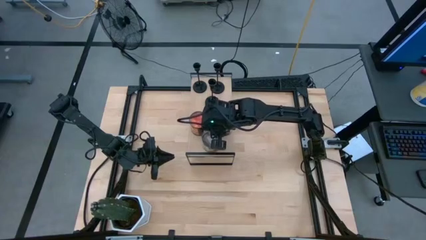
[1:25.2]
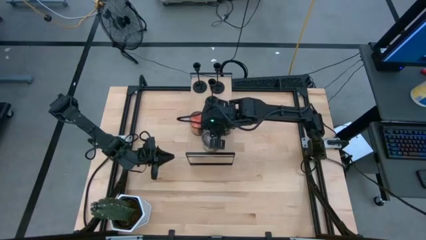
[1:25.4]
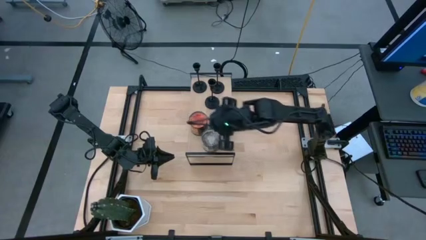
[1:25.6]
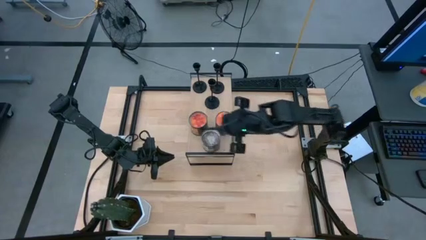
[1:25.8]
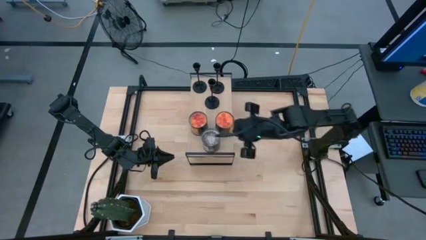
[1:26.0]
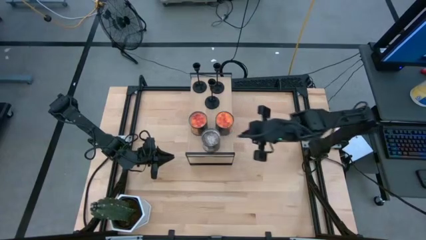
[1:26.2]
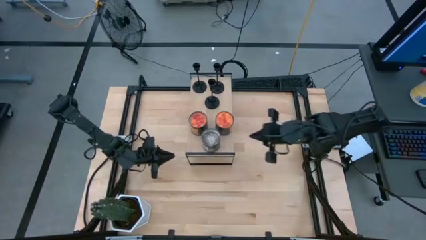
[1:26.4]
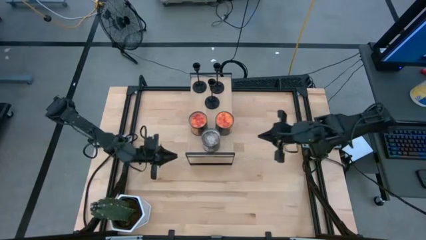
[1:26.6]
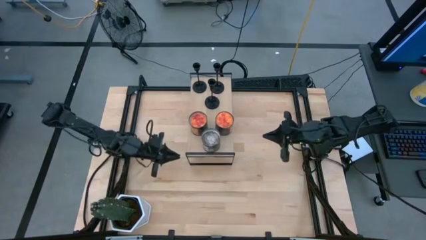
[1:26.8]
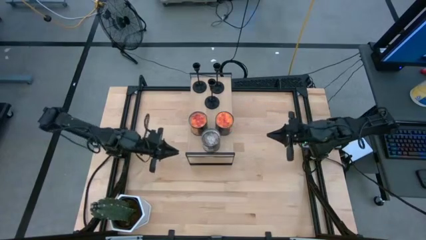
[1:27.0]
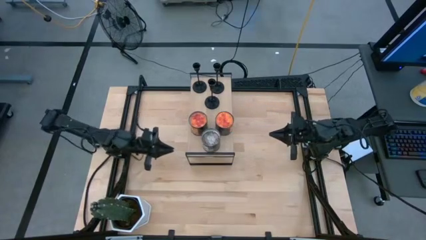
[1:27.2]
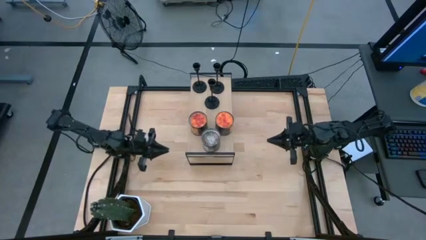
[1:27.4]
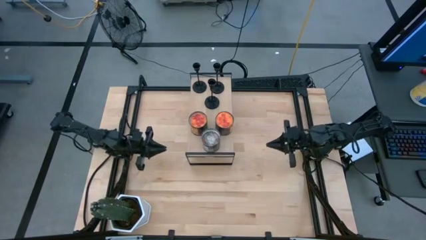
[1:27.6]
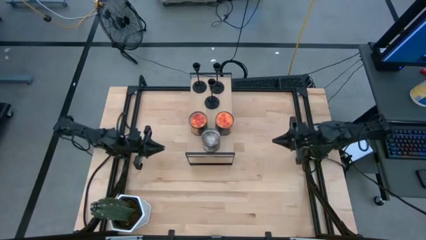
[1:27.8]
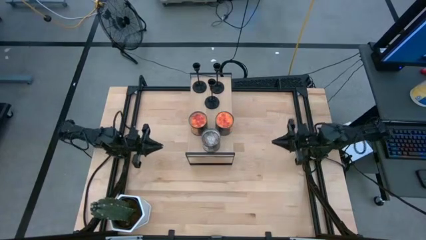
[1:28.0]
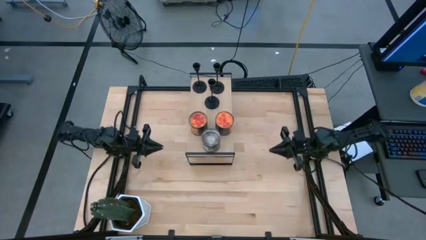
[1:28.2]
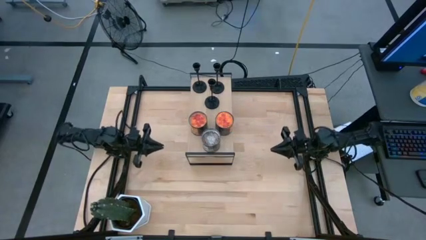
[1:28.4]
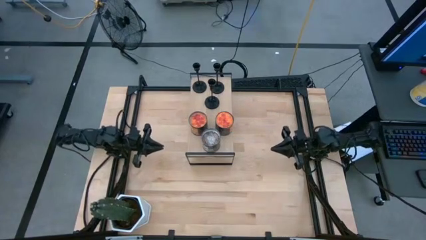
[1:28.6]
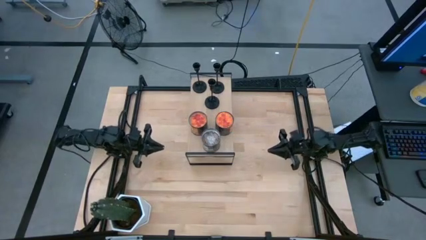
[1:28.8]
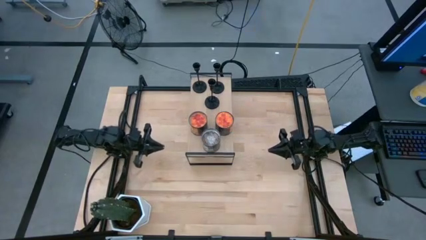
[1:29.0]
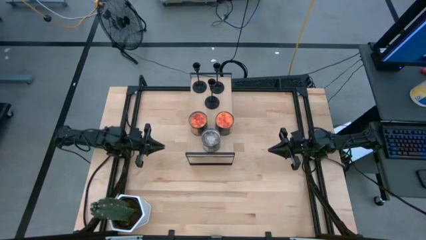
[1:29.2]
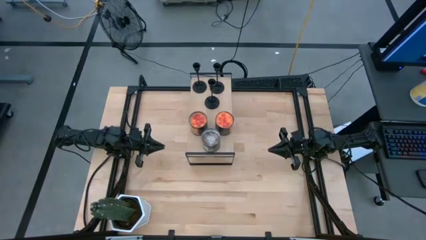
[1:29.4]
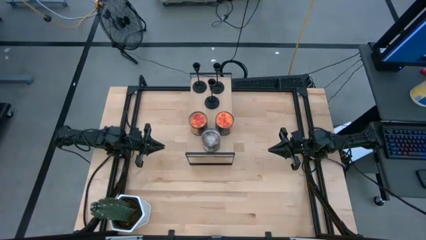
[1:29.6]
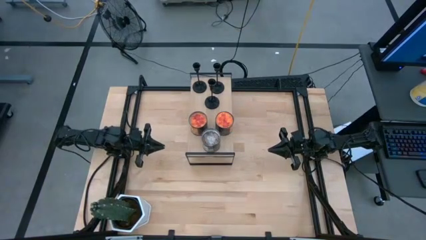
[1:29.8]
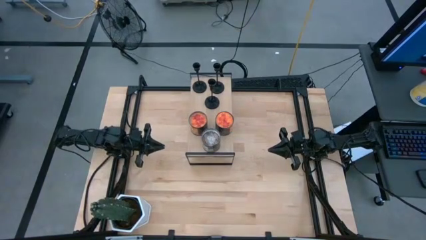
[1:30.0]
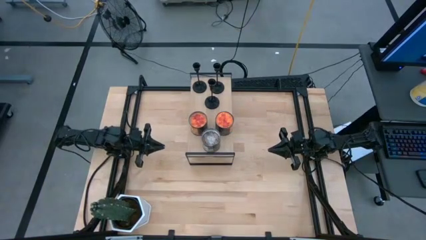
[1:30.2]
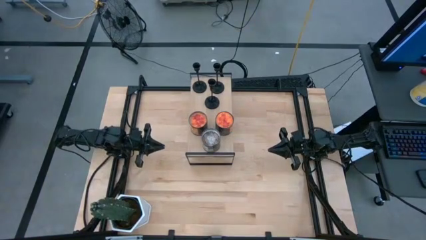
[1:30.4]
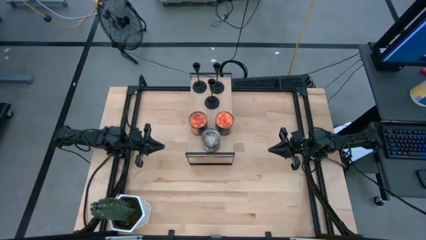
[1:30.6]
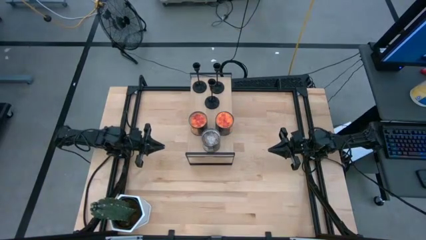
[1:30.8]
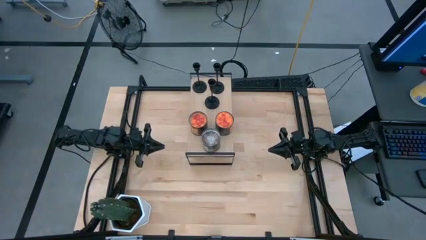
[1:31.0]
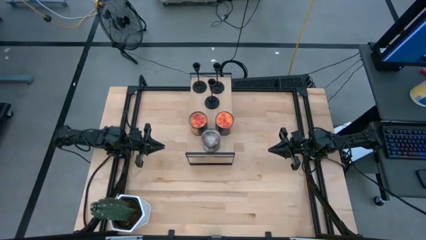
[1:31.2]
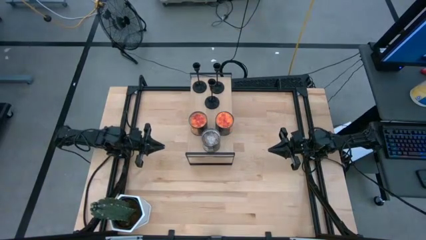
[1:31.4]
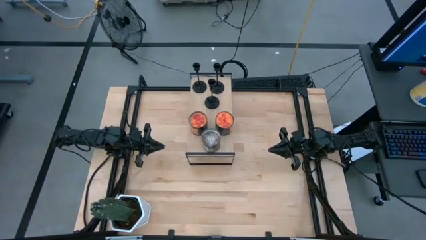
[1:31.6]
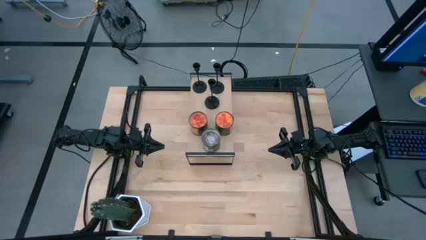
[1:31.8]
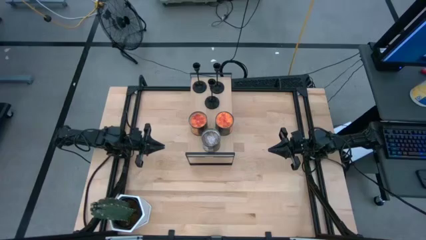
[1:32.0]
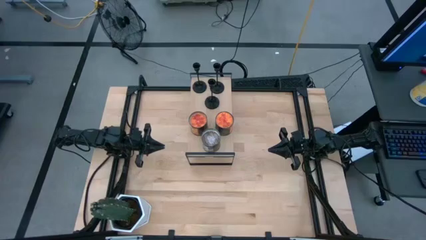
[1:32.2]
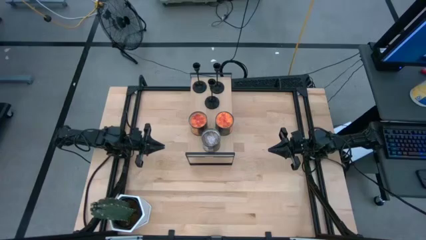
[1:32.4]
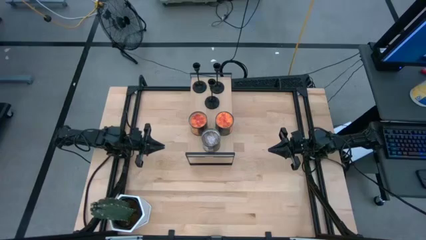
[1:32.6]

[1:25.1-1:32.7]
Task: Pick & Place candle stick holders
Return to Home Position

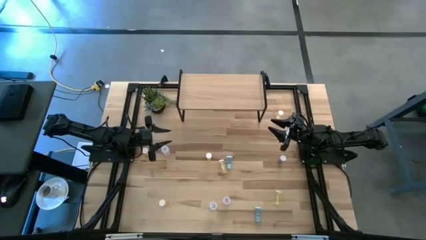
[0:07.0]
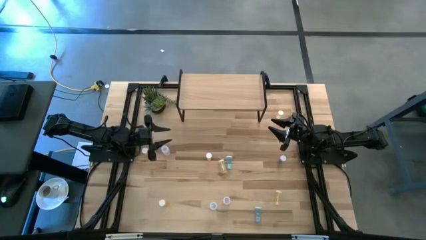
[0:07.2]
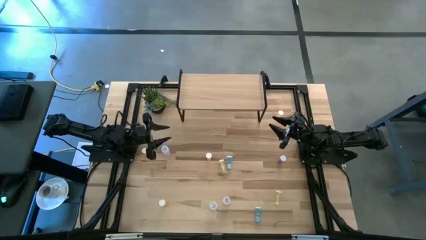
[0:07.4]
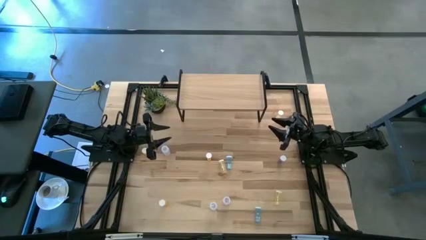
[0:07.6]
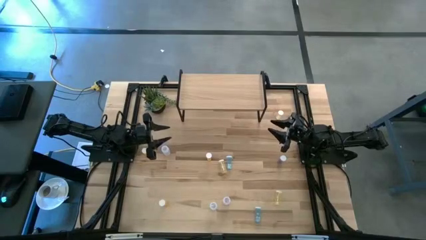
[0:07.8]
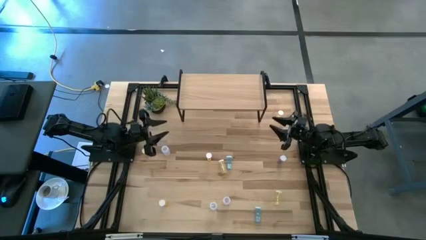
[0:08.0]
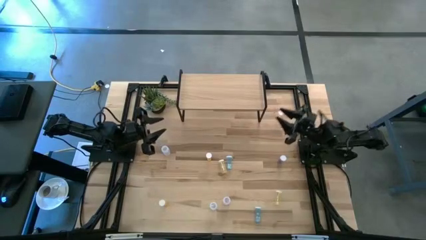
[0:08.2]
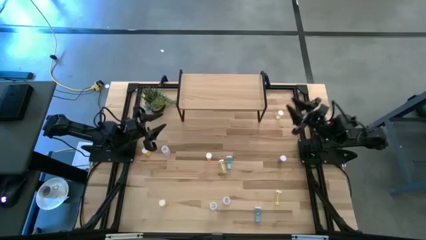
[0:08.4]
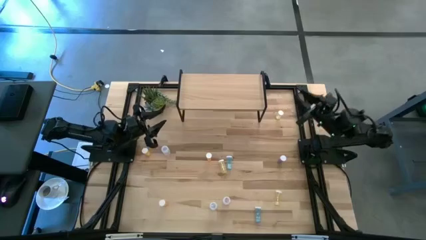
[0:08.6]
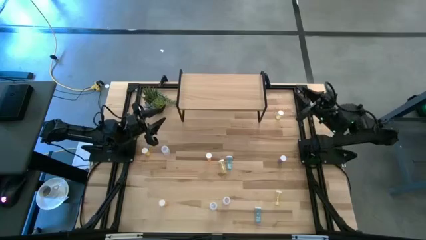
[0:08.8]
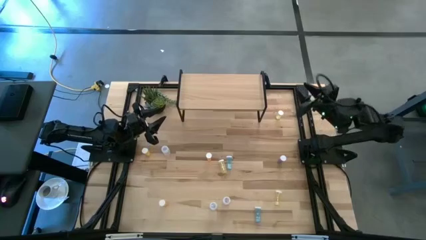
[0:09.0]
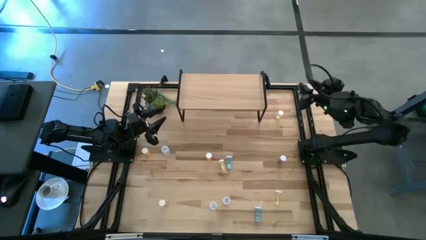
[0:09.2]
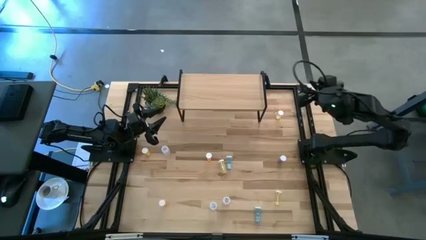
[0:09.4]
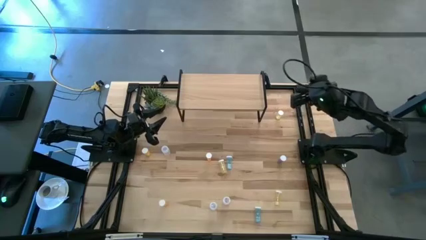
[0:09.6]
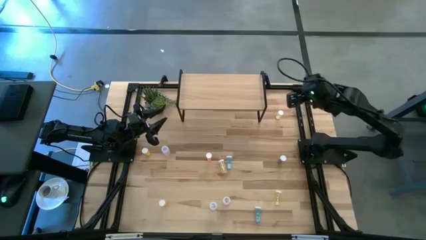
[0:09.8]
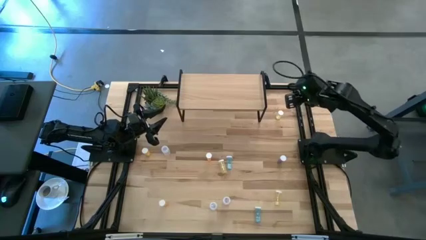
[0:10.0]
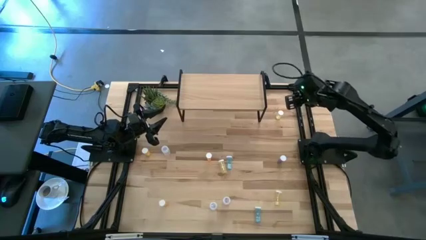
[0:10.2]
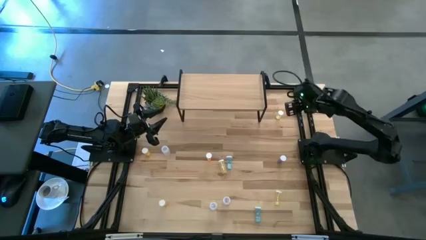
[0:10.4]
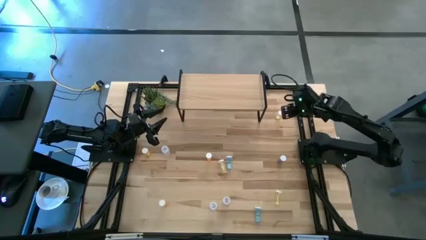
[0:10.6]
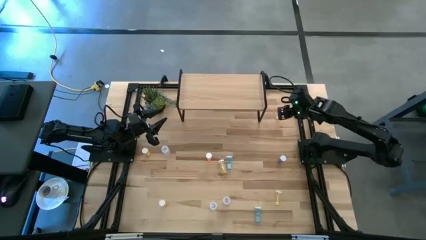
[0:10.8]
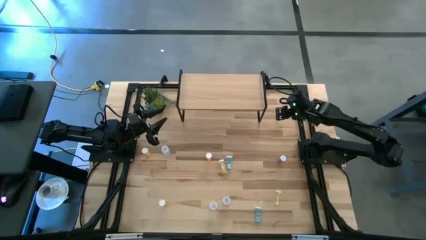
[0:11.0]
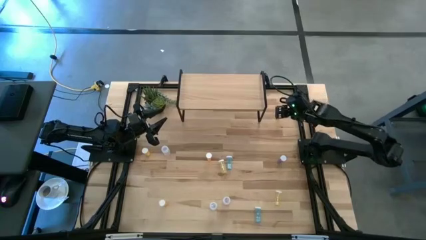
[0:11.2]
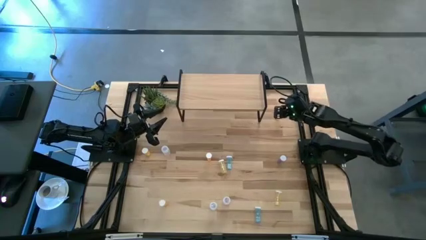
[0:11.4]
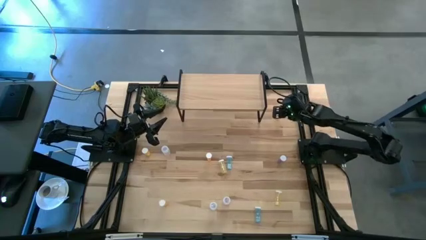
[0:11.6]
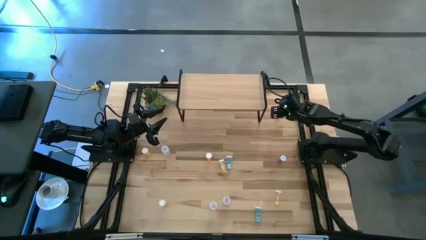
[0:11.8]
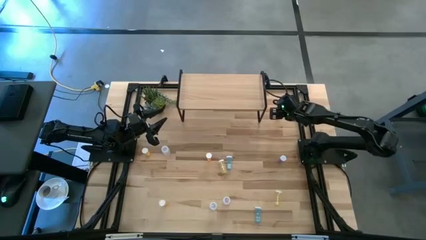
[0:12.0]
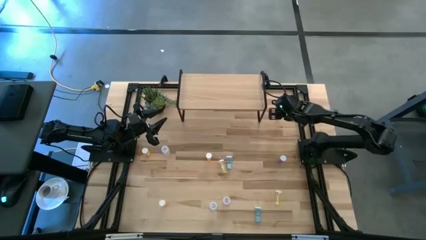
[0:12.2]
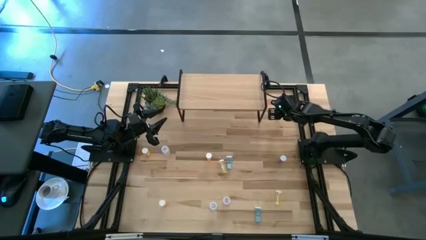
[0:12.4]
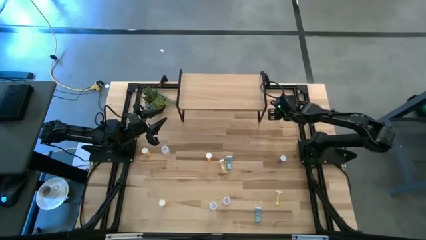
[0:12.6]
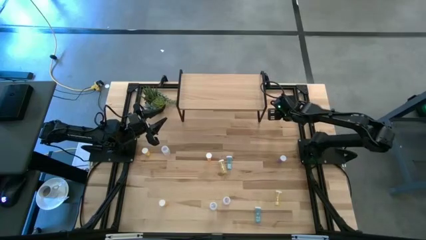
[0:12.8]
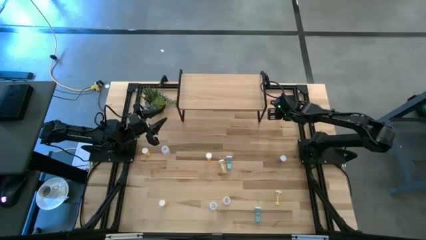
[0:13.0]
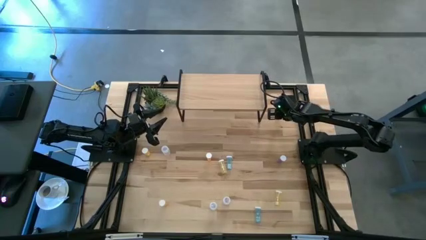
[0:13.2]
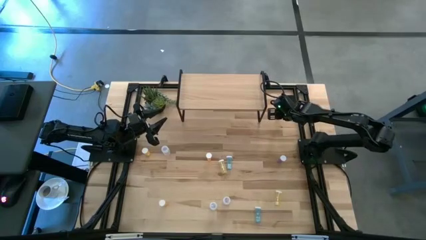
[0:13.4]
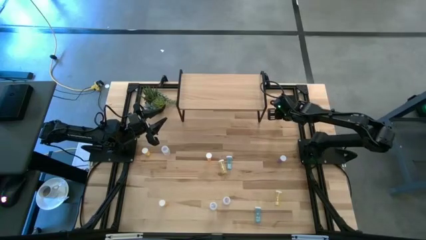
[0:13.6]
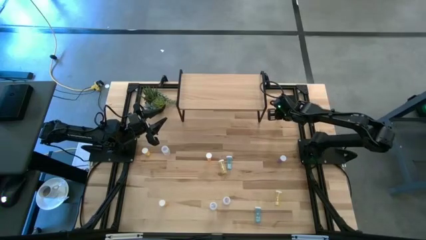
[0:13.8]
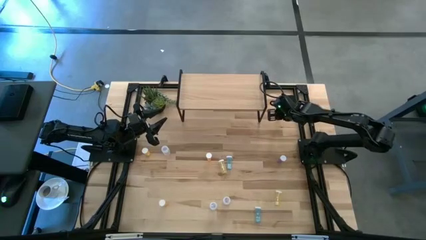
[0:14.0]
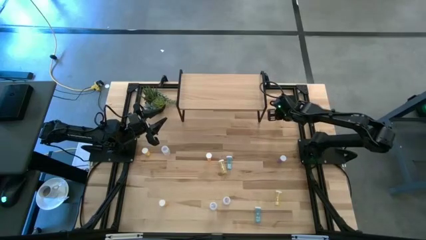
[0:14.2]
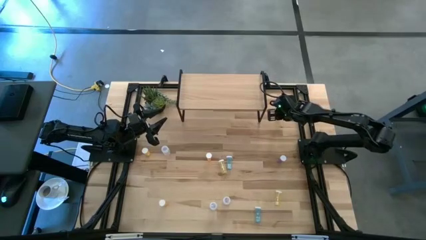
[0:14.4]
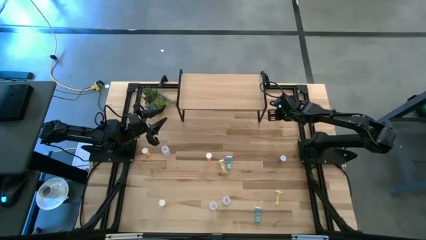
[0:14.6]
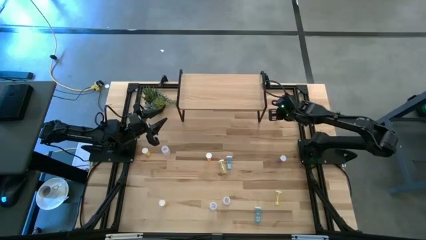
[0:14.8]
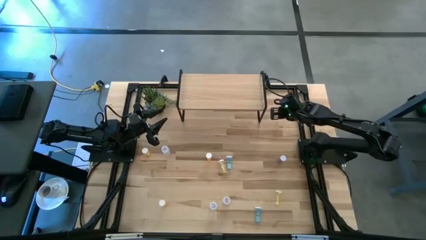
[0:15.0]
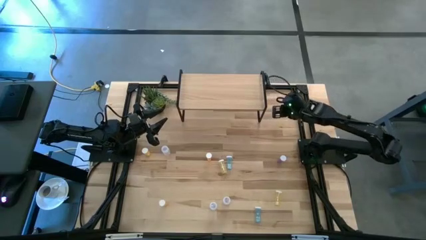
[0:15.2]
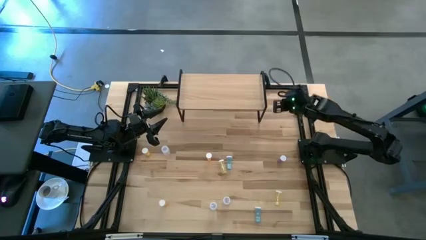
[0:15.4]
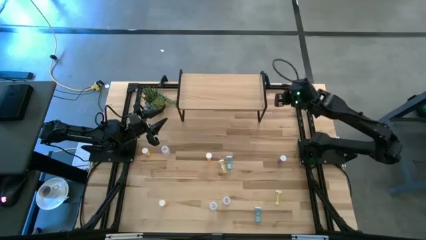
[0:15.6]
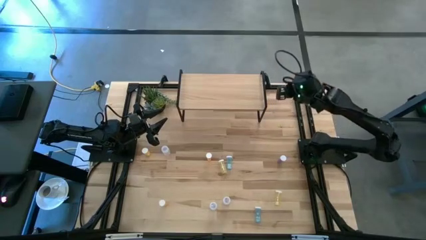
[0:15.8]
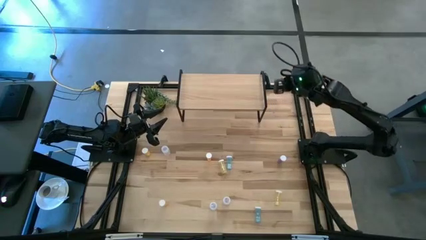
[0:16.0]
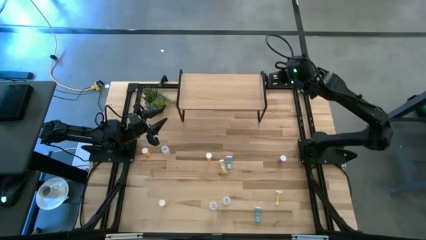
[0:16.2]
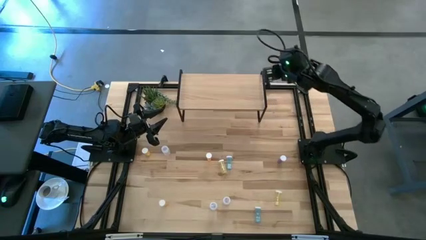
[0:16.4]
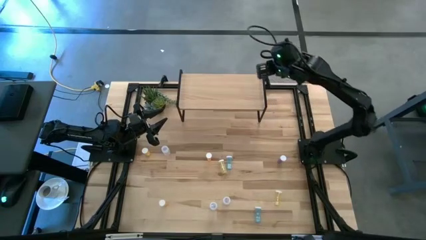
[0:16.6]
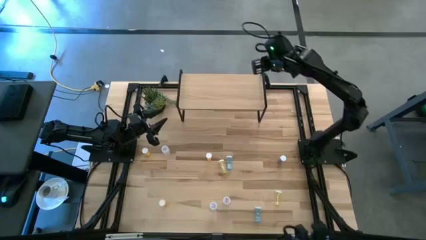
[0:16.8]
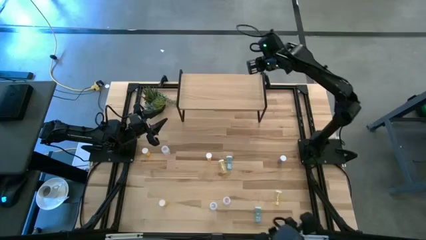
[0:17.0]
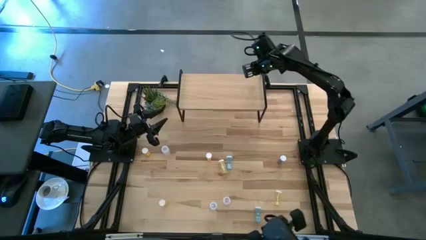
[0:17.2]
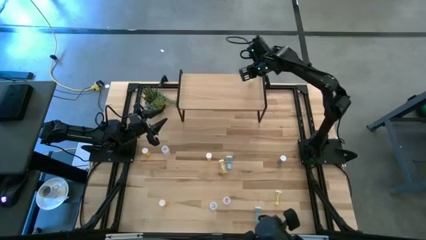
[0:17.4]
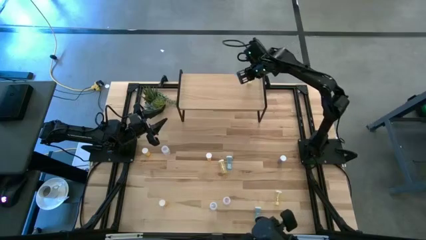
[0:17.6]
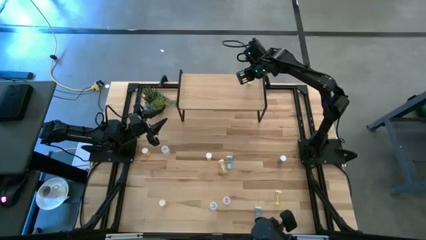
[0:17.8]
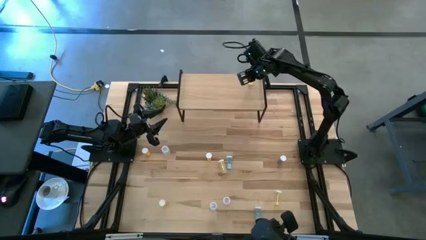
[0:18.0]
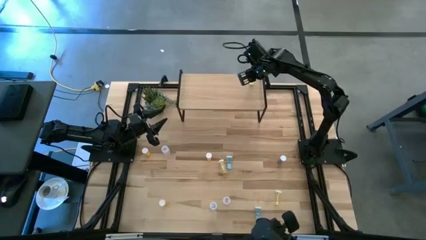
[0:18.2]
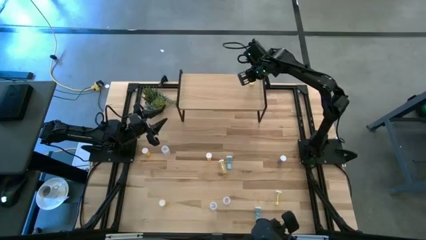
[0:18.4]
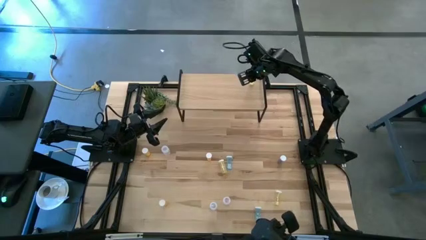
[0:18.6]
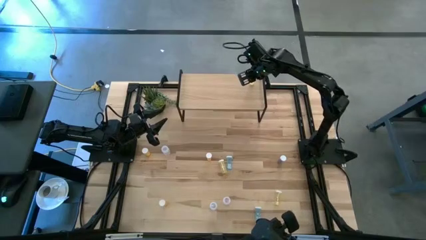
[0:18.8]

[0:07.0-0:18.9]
Task: Pick and place medicine bottles onto shelf by color
Put the top yellow pill bottle on the shelf
